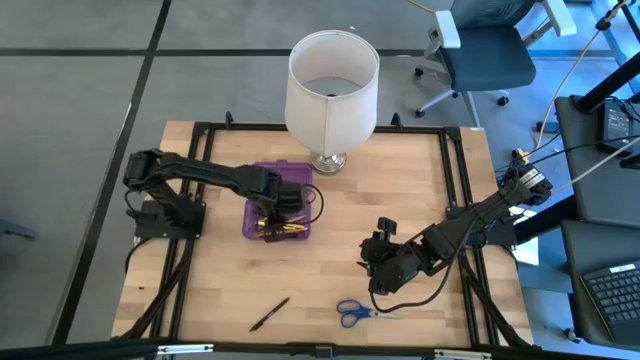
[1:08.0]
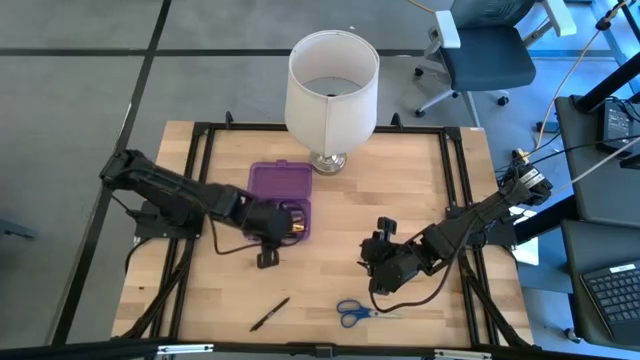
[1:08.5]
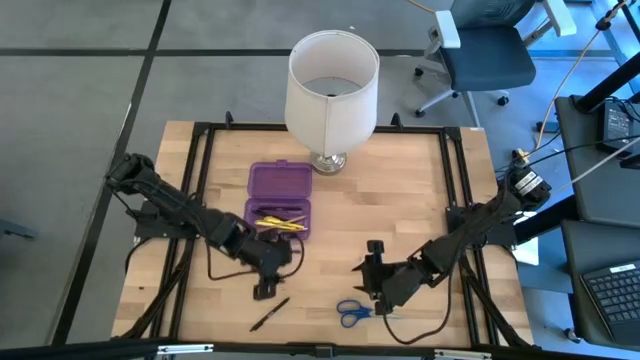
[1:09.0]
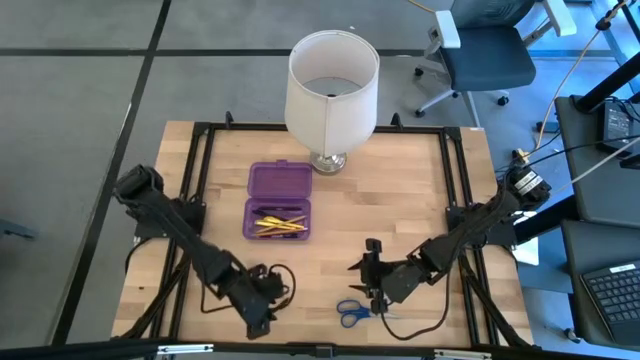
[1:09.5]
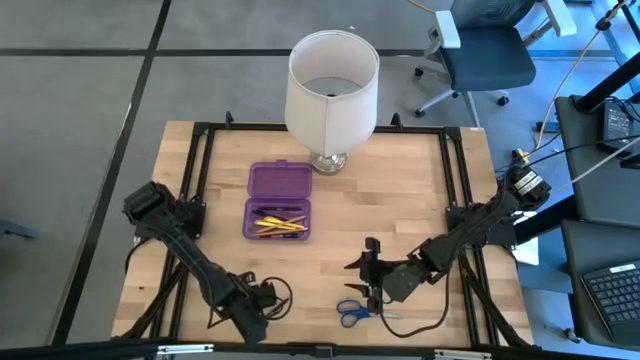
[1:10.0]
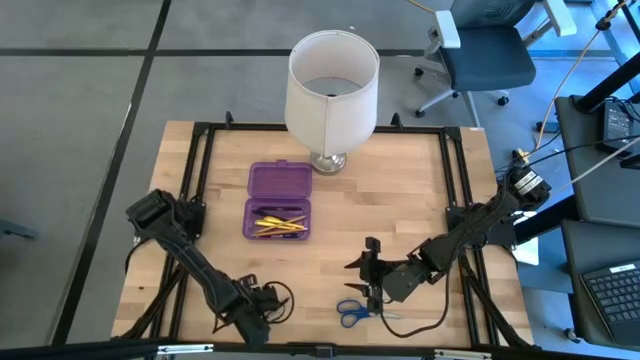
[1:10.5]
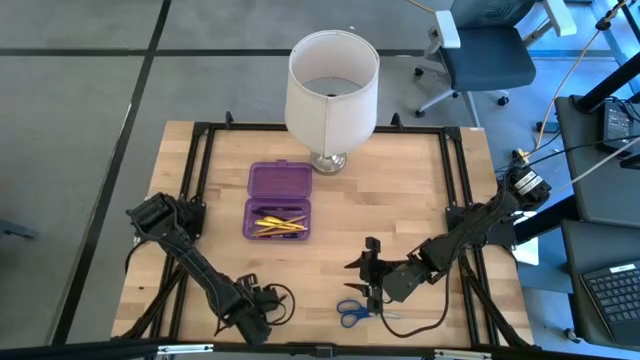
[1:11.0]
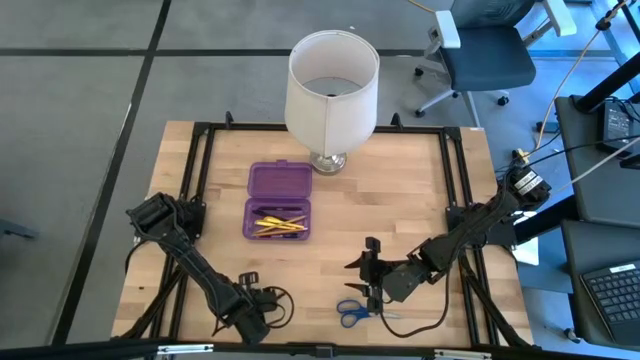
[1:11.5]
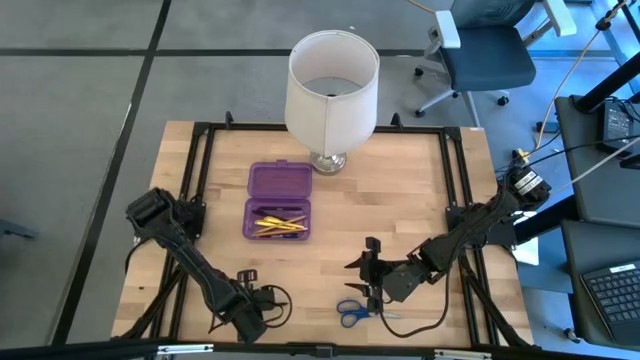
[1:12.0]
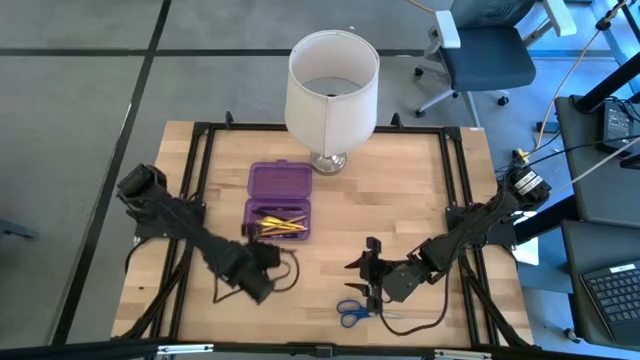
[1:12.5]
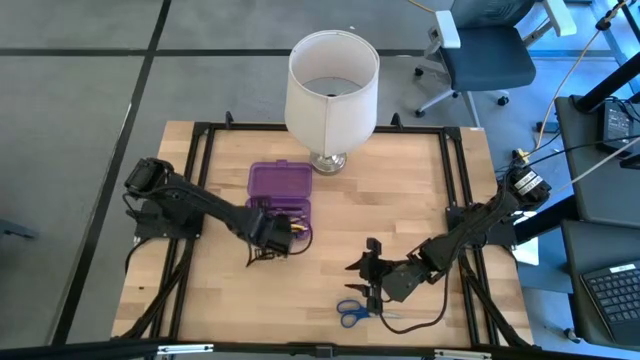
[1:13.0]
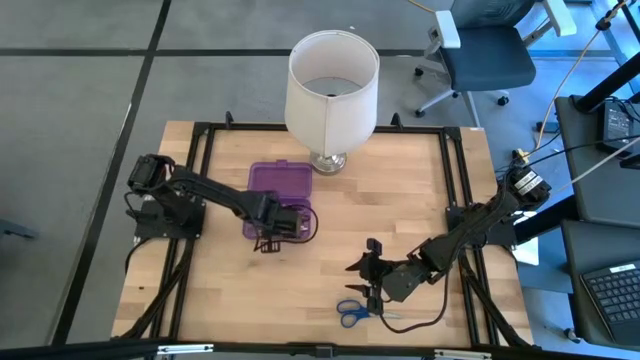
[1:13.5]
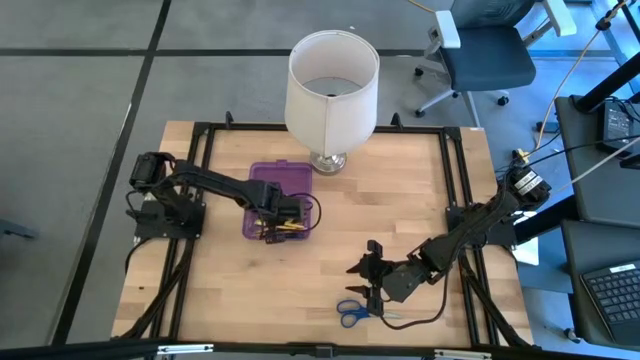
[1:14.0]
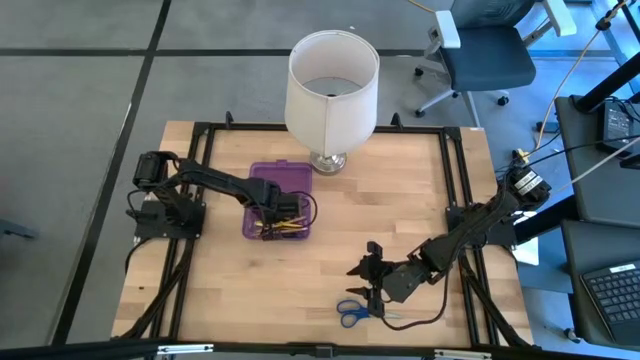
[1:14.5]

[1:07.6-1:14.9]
Task: Pick & place school supplies into a supply box
Put the black pen into the purple supply box

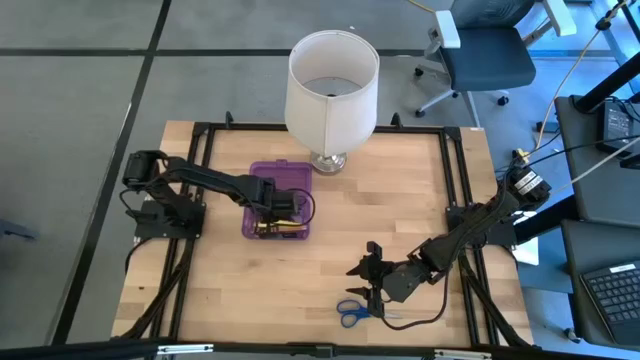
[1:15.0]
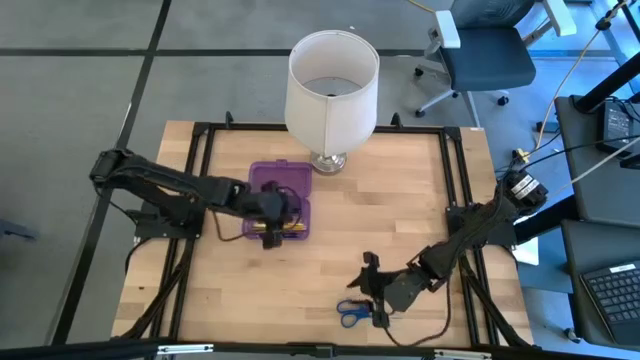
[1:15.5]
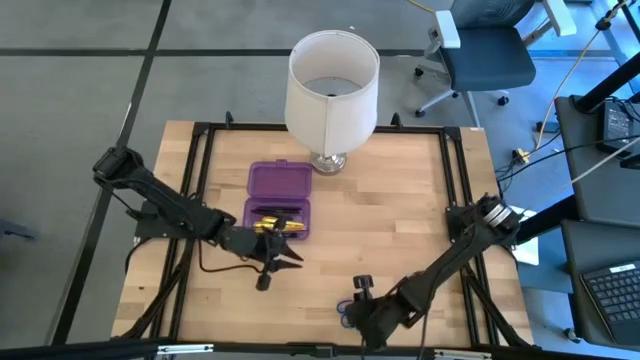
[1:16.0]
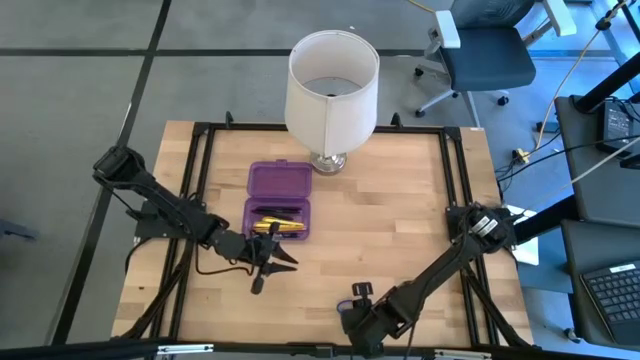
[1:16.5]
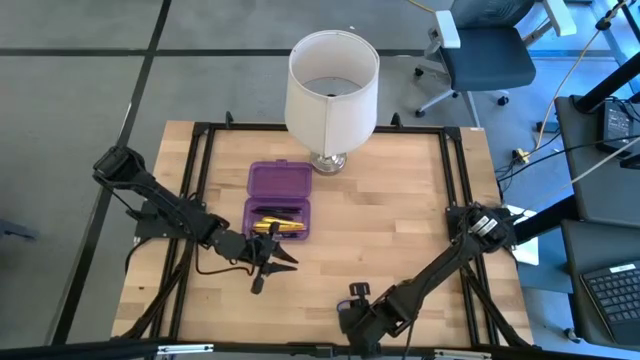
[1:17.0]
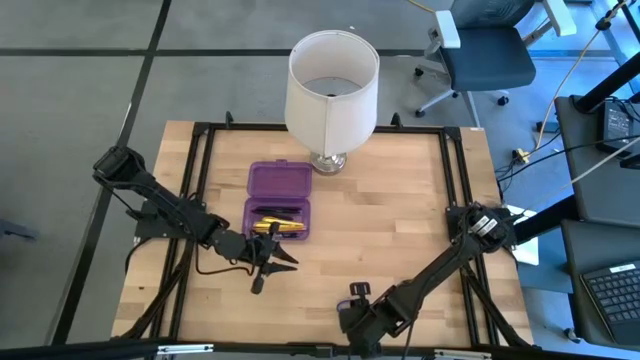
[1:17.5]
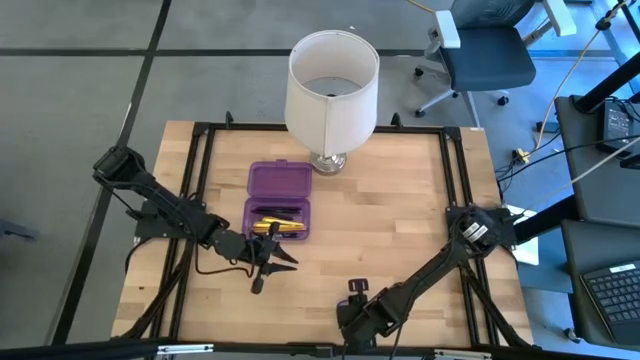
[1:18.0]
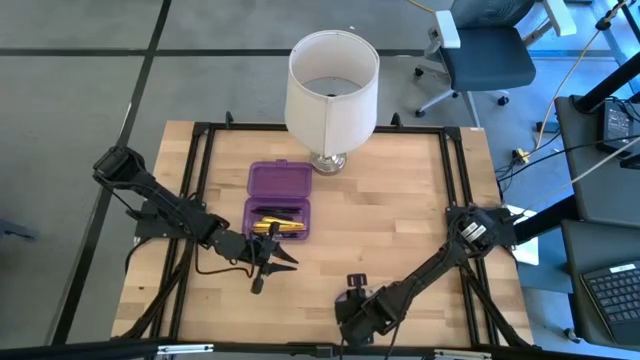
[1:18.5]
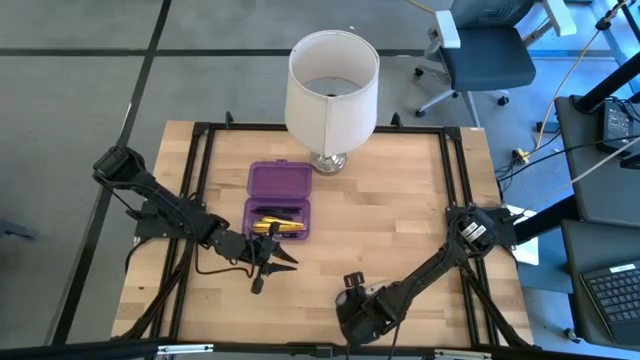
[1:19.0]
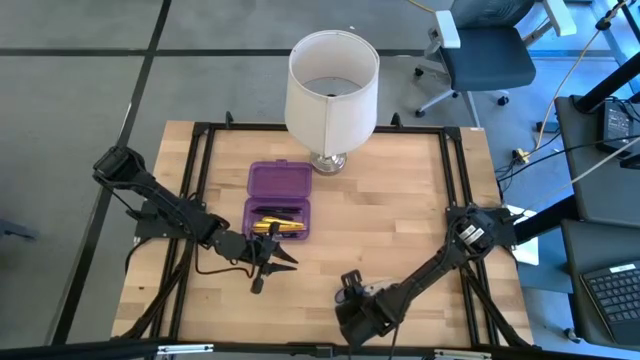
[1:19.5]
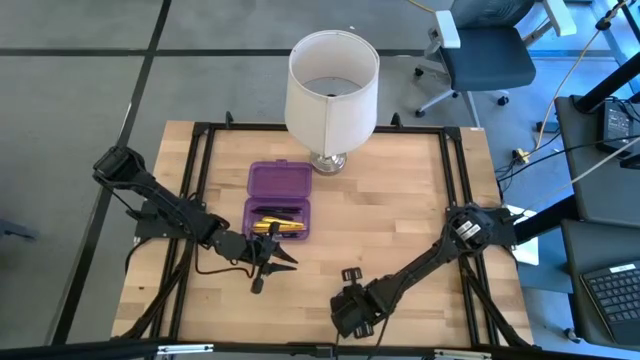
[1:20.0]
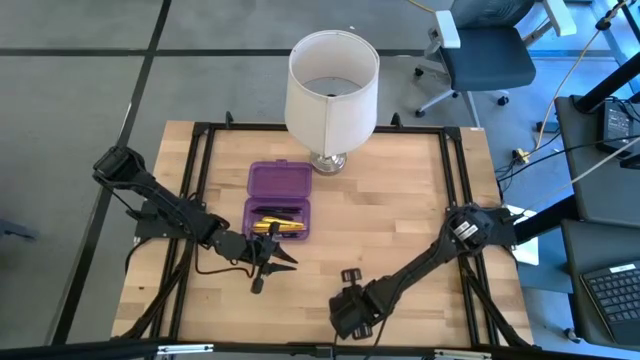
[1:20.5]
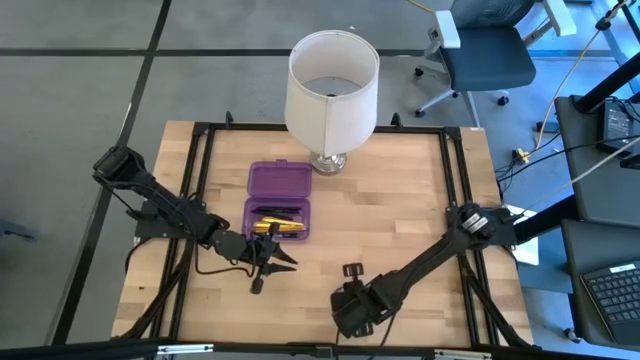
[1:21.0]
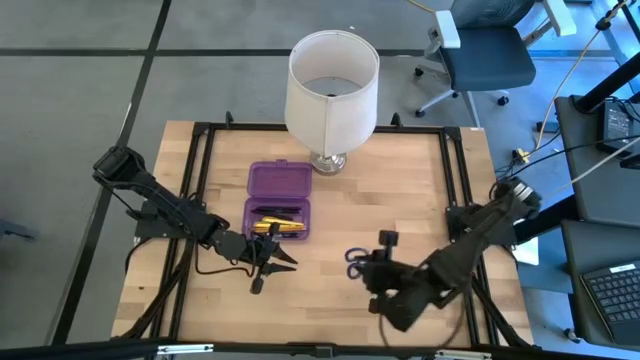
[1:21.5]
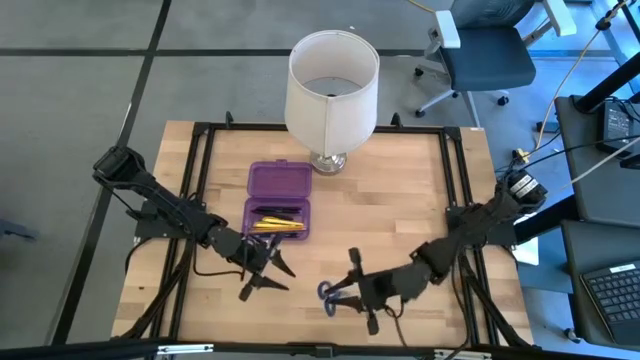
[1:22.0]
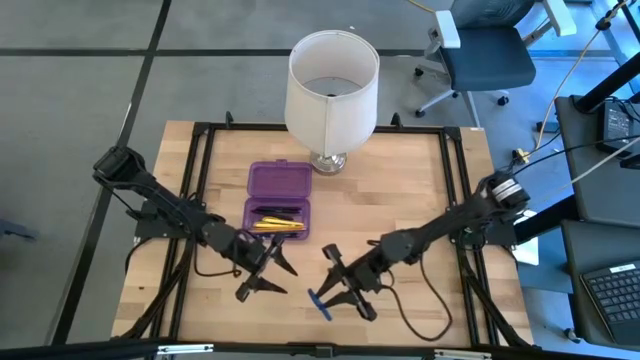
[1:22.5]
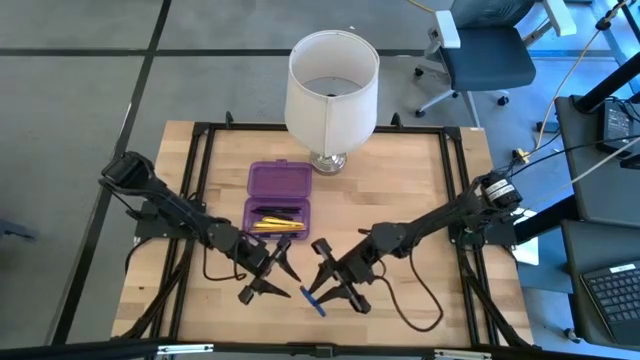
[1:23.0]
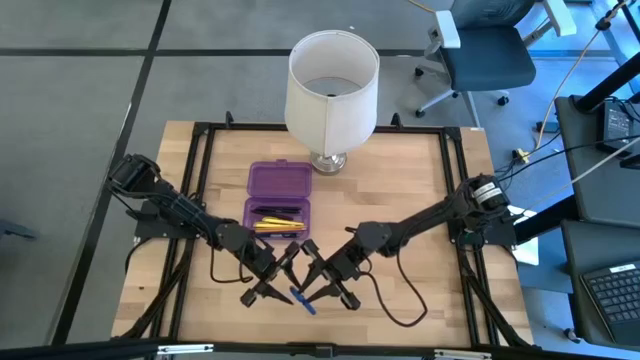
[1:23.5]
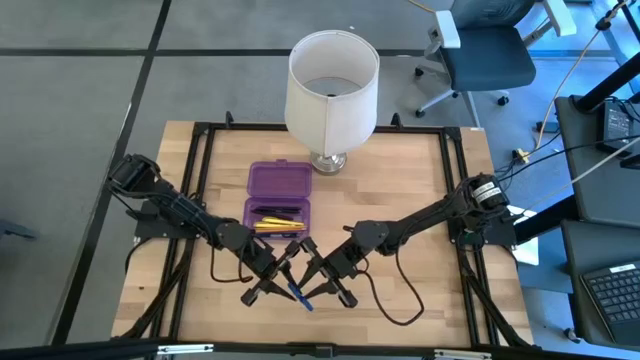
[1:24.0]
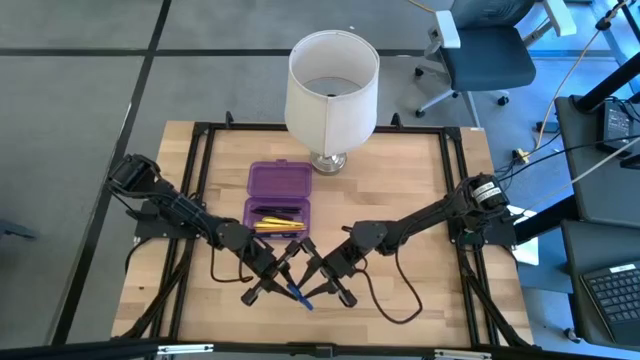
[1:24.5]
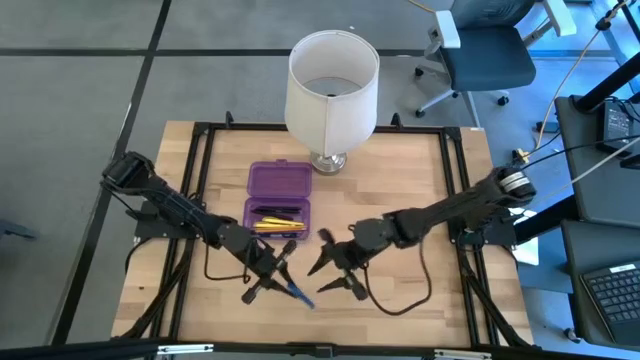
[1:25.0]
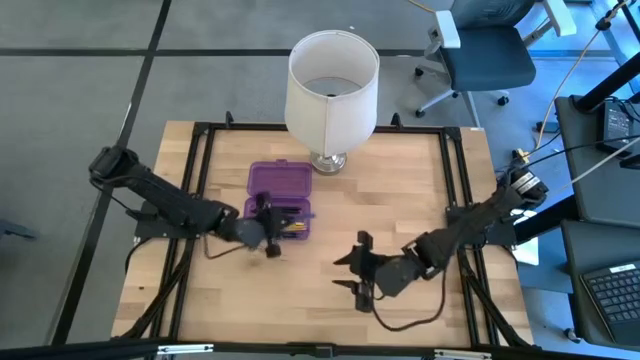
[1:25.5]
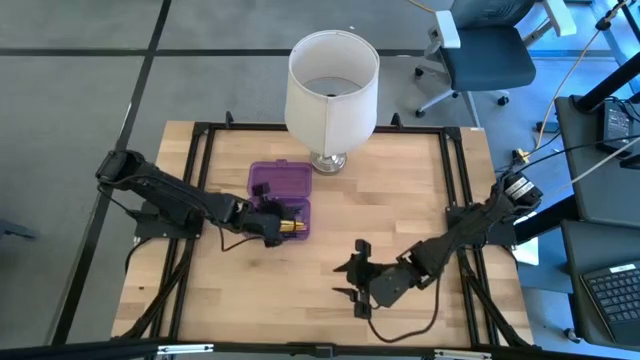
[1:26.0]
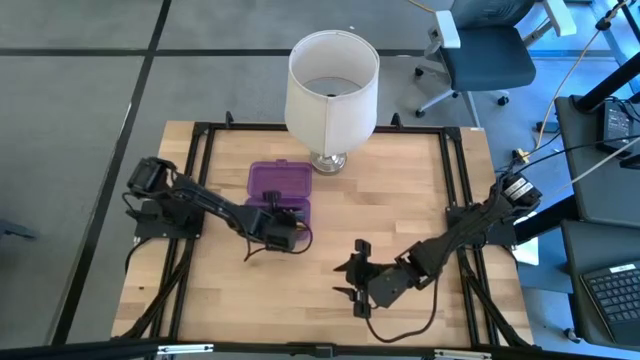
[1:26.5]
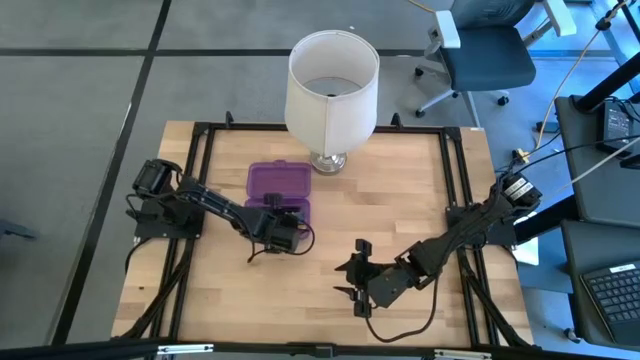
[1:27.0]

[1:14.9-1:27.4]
Put the blue scissors into the purple supply box

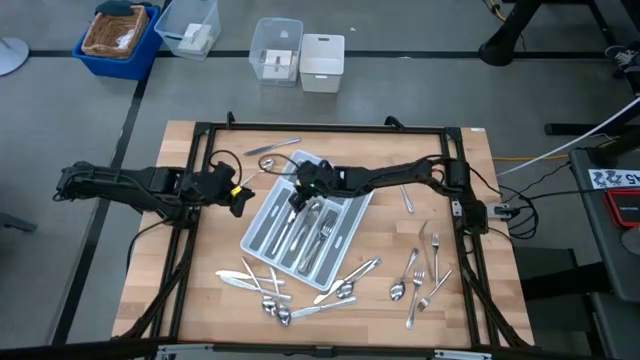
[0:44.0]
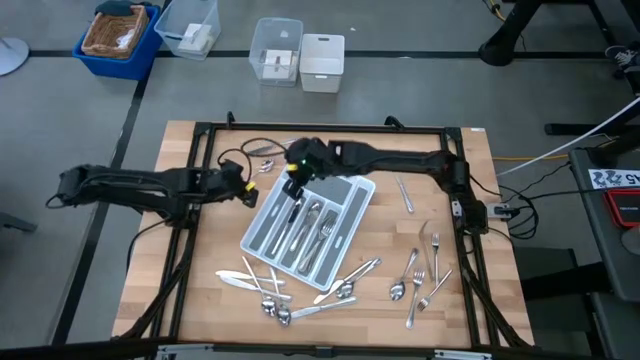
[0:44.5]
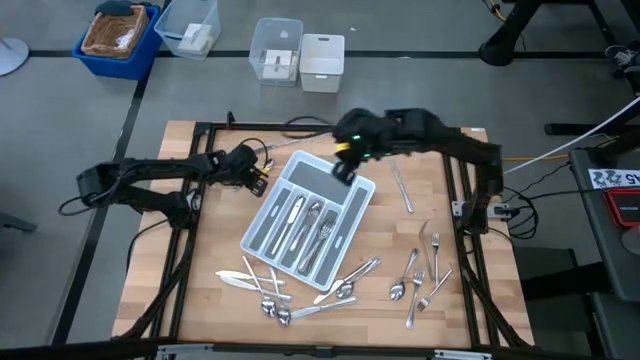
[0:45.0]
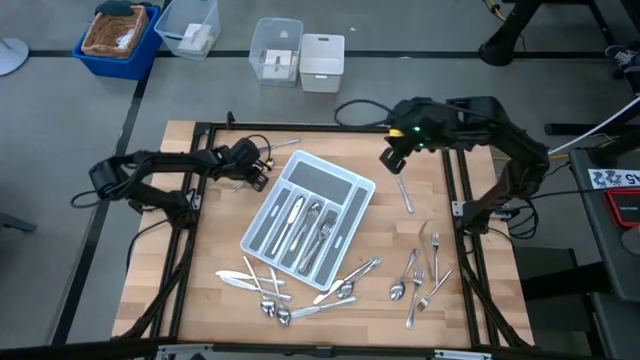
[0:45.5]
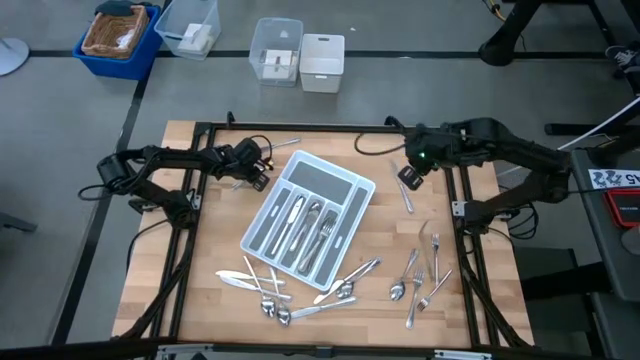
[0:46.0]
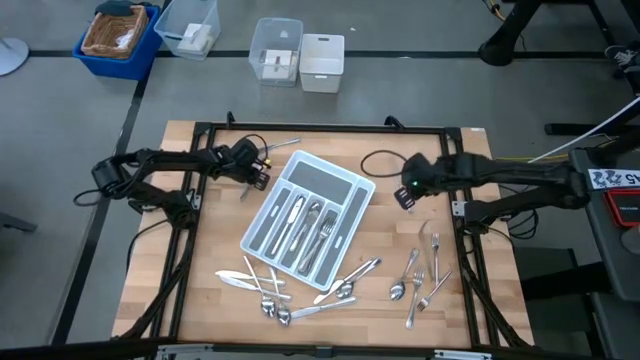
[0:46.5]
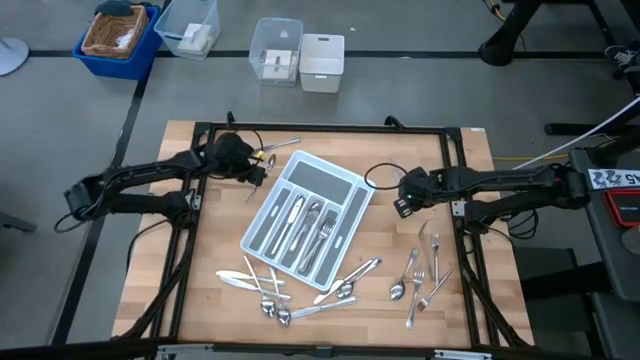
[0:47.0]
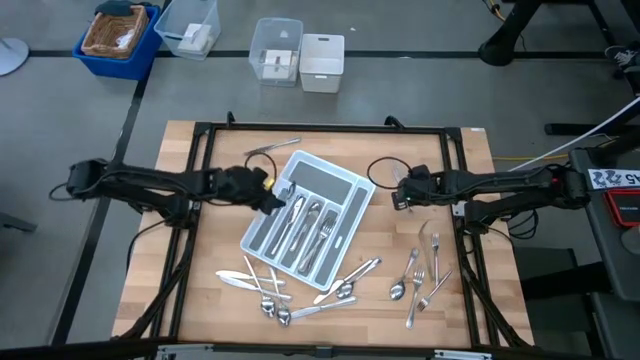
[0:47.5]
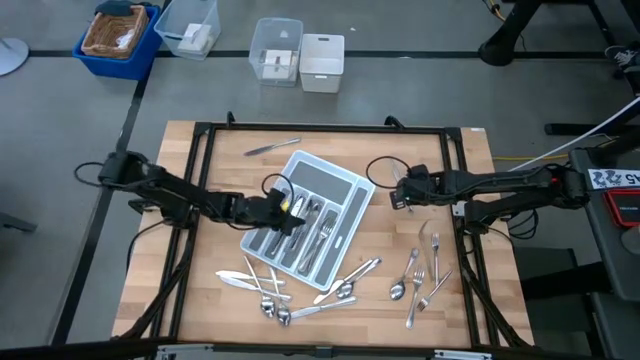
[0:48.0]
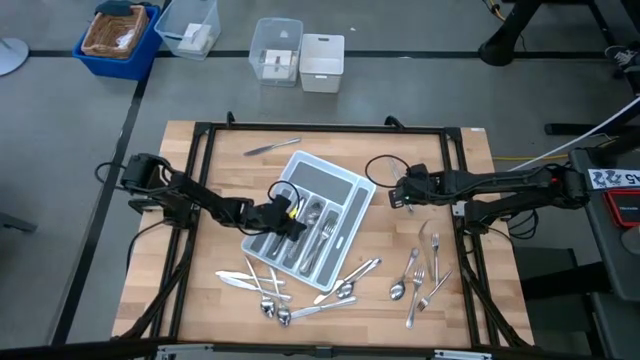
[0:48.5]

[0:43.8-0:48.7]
Task: Sort silverware
Put the silver spoon into the white cutlery tray
